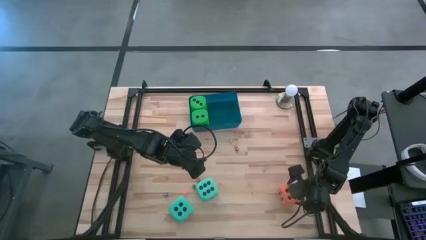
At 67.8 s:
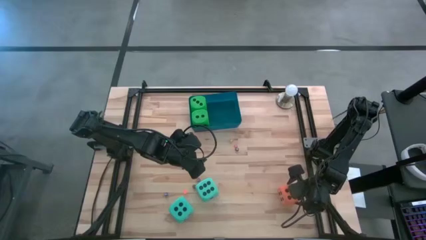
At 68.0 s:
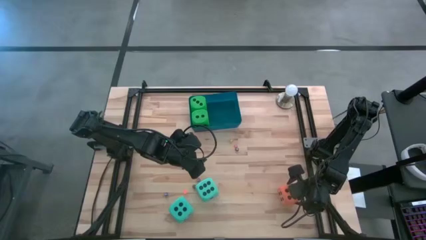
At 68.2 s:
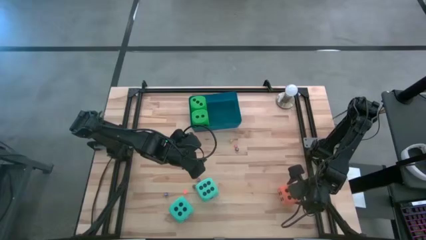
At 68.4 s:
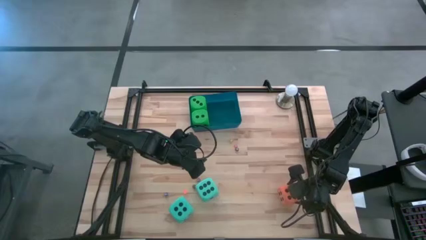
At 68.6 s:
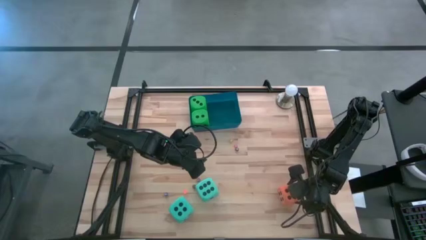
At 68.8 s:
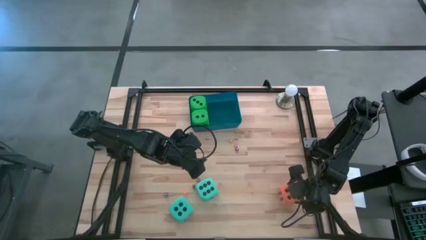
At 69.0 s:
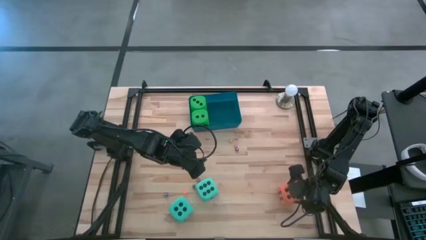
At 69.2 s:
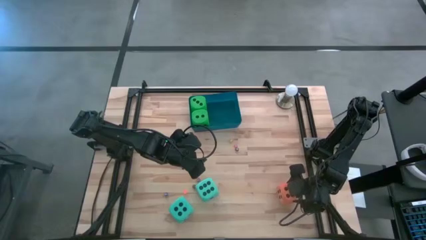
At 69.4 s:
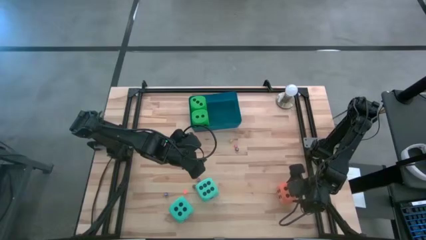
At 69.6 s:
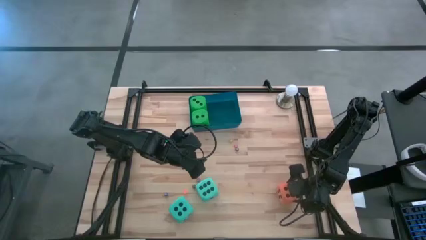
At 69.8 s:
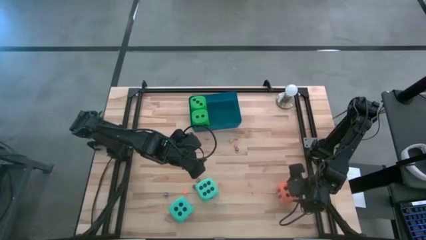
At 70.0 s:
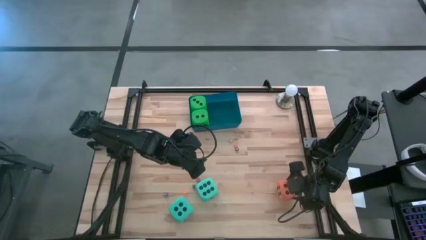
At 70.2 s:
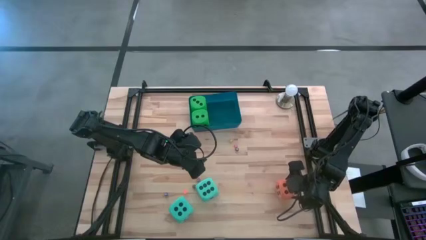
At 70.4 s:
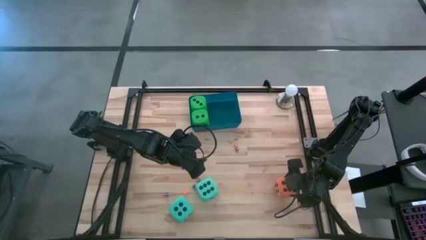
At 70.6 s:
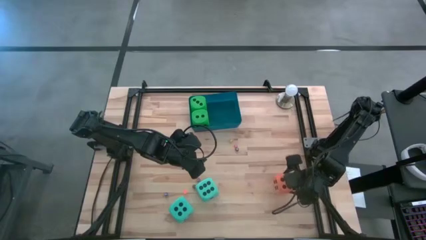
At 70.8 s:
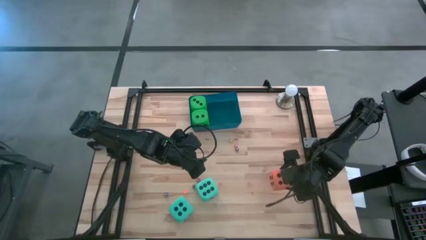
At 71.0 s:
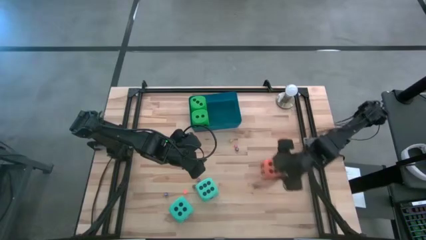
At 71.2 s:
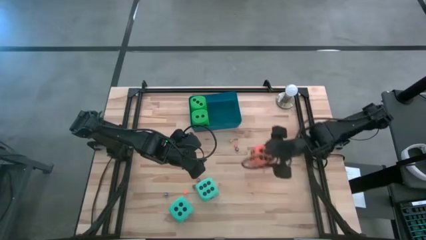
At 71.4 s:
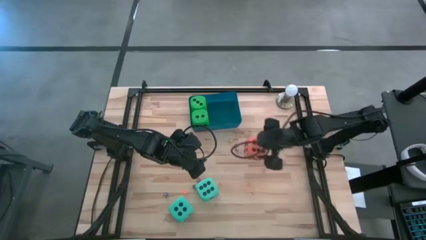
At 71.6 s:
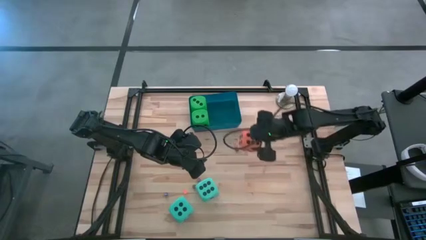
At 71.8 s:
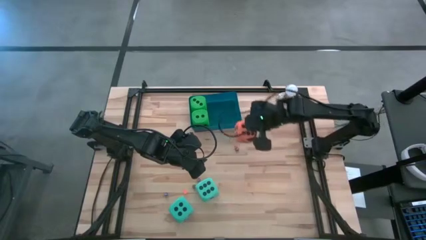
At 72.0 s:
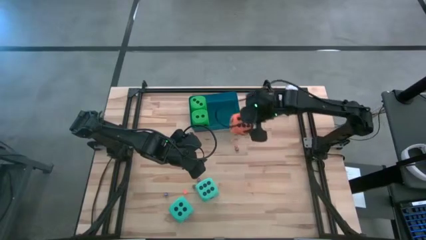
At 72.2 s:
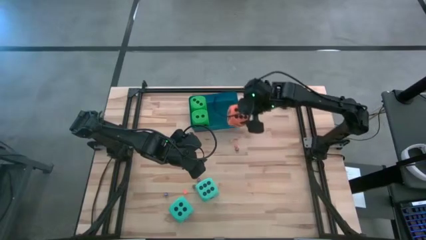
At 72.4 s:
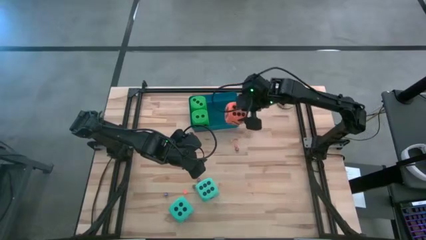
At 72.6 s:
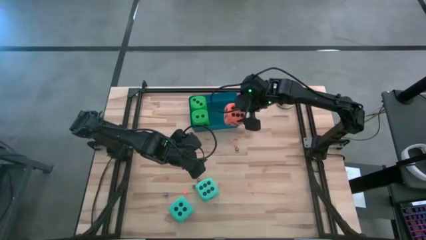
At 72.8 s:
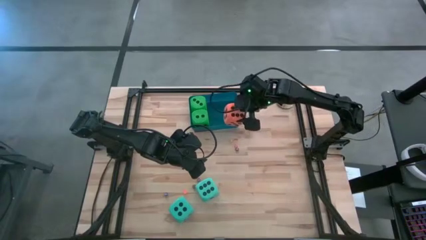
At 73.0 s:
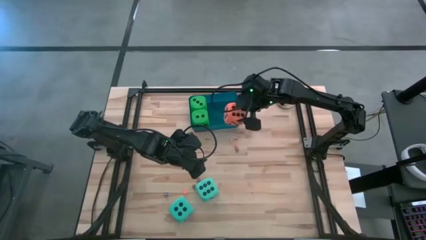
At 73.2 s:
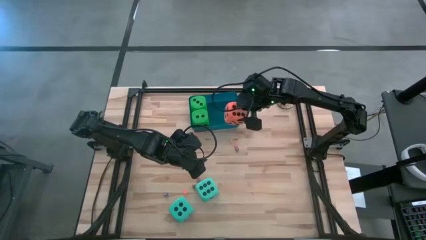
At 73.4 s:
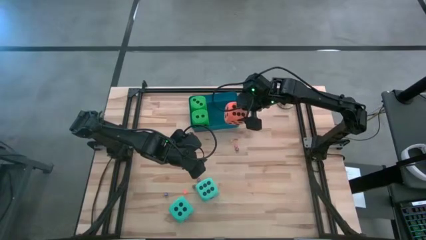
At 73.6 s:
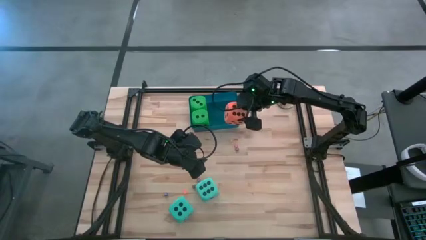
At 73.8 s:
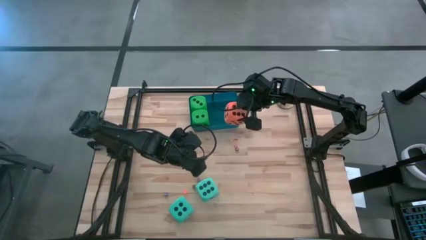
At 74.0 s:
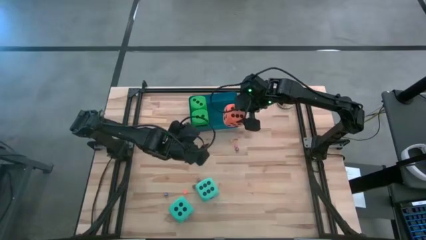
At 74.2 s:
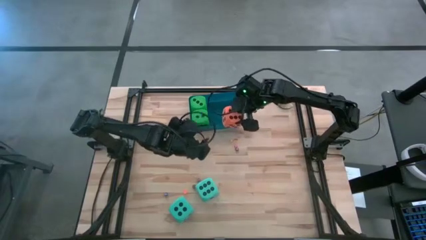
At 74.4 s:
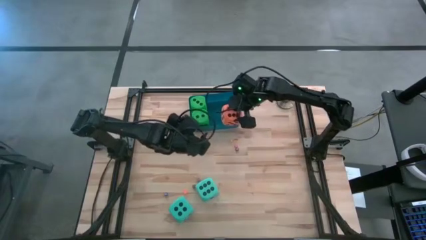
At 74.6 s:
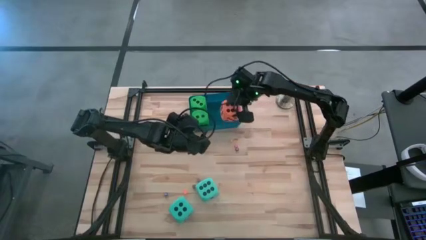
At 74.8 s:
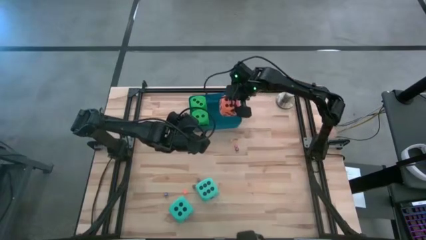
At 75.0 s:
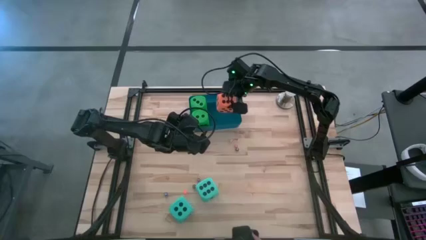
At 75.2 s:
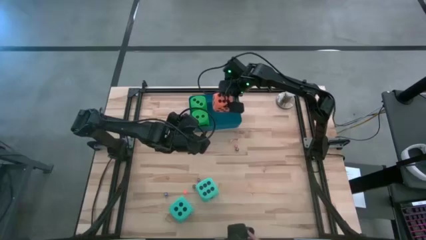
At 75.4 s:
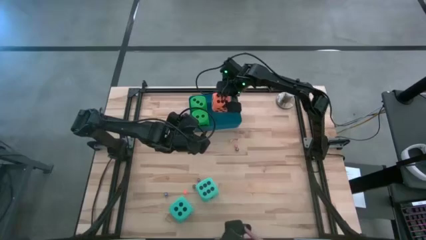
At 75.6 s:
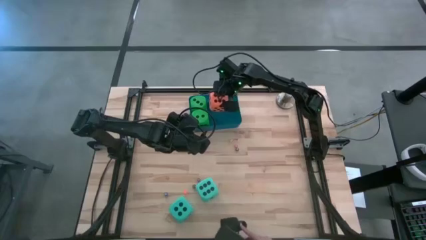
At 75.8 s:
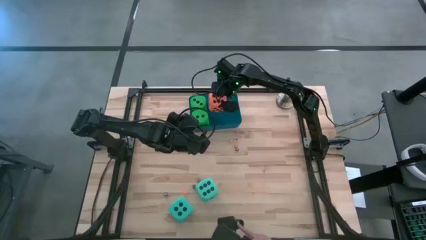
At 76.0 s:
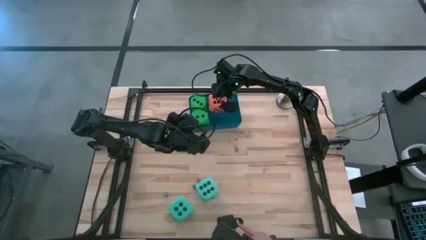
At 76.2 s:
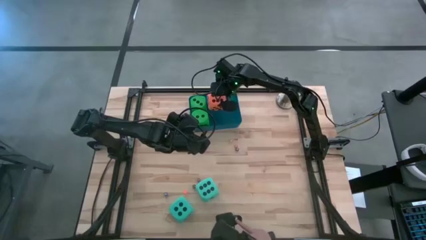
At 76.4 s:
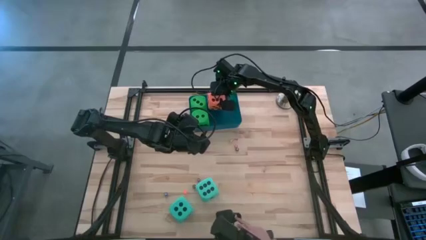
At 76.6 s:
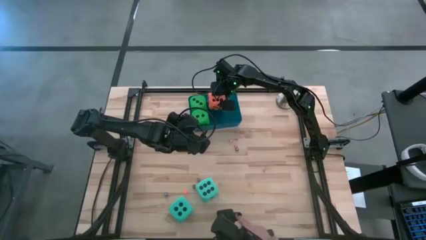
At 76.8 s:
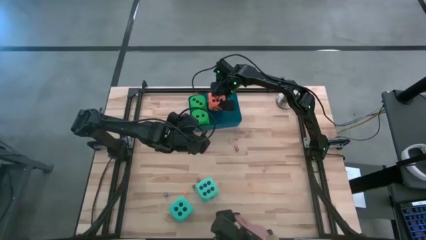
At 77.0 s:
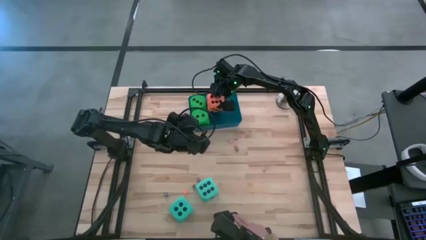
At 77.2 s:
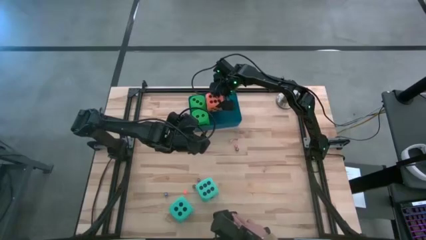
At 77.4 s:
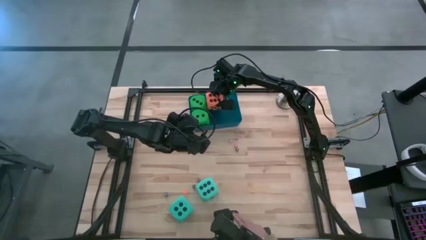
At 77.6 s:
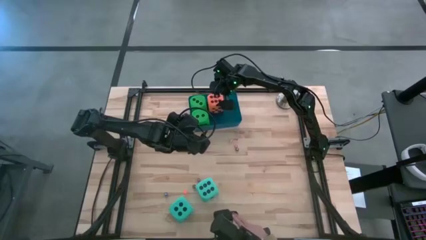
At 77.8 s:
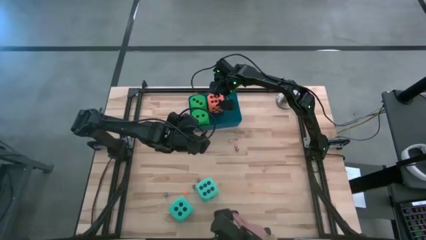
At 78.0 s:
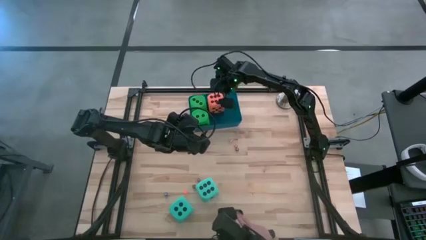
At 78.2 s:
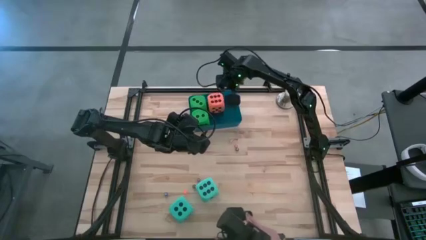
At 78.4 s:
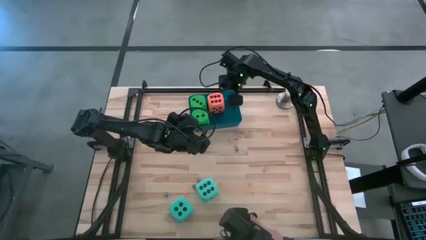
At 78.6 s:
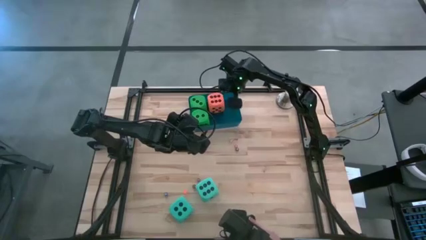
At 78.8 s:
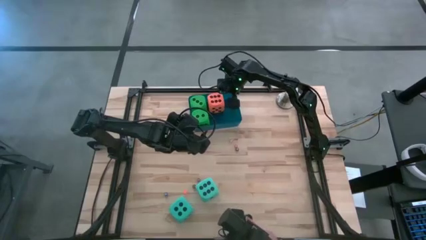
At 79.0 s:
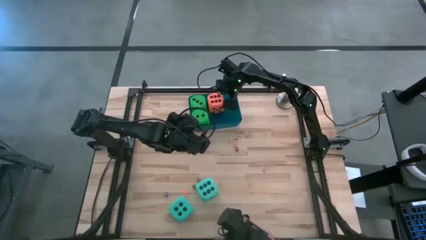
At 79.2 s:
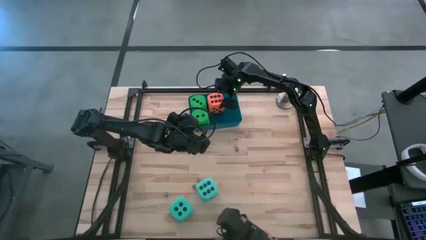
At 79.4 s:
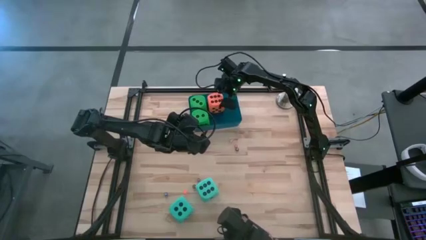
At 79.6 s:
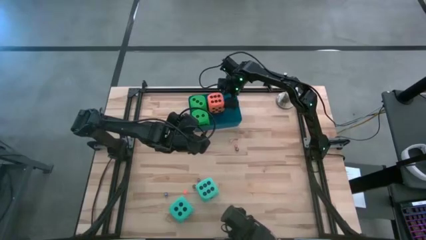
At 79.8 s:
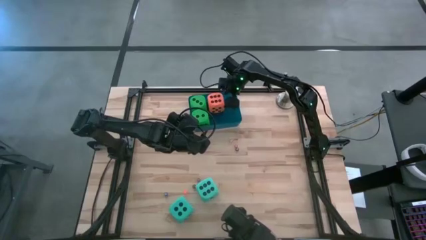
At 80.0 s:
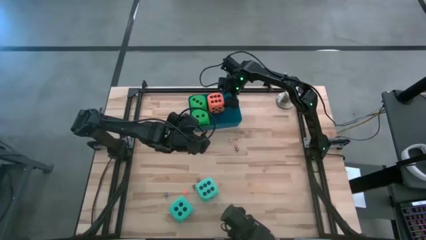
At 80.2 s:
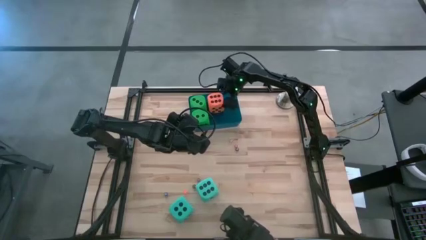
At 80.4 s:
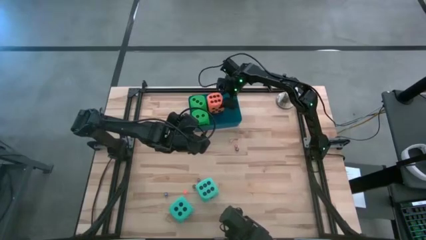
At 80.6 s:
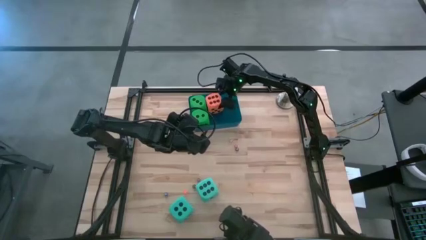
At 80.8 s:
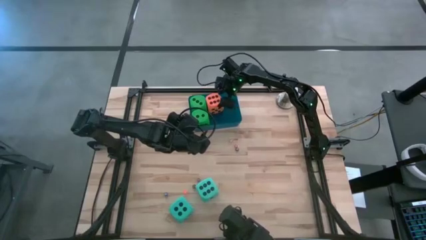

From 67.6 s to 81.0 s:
Task: Pick & Place Dice
Put the large orange dice into the blue bin
